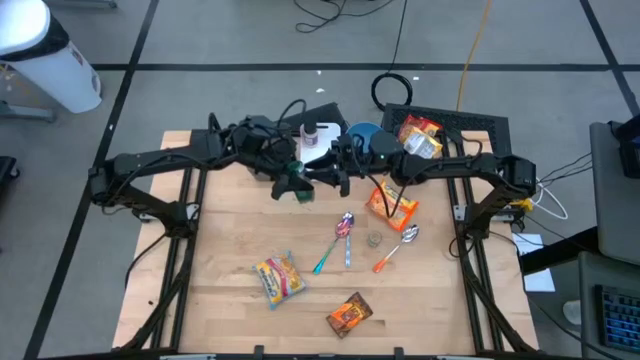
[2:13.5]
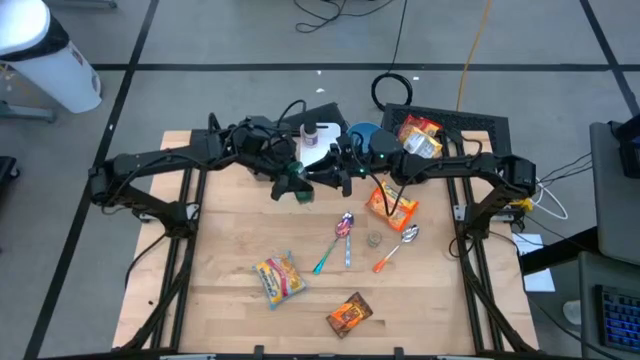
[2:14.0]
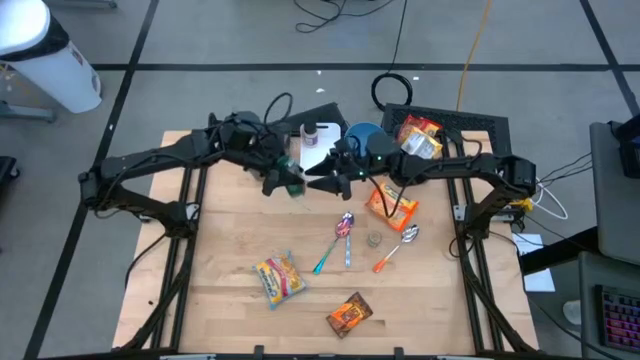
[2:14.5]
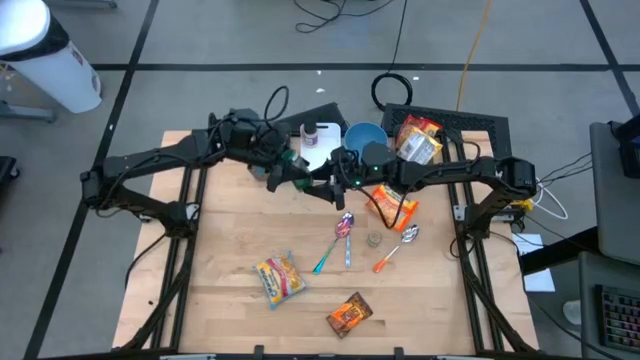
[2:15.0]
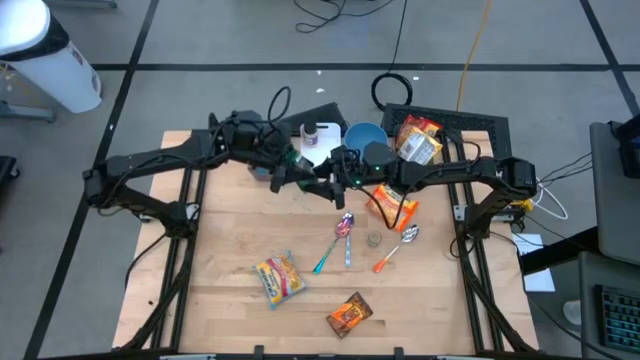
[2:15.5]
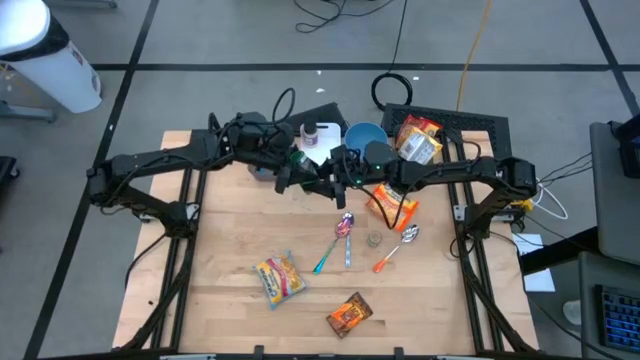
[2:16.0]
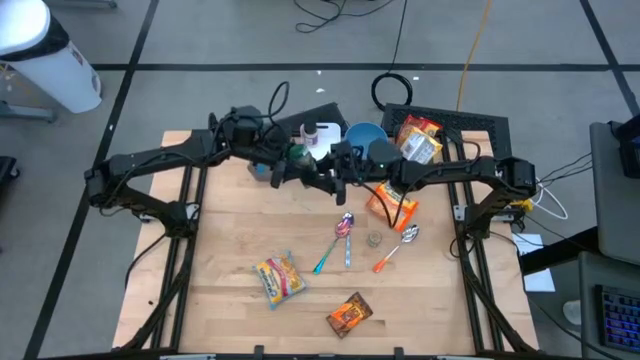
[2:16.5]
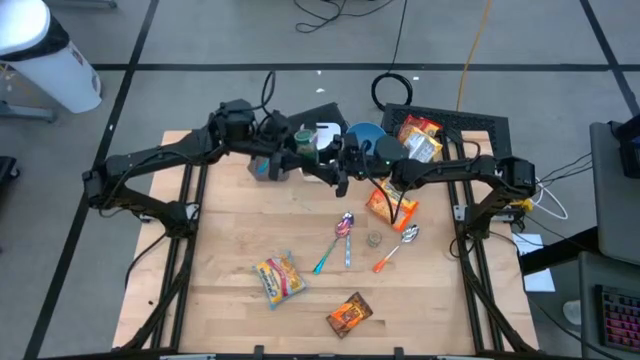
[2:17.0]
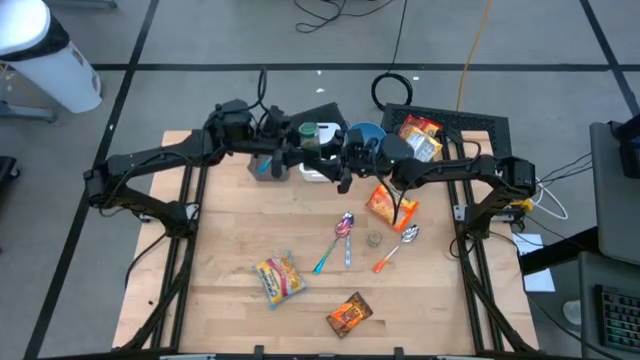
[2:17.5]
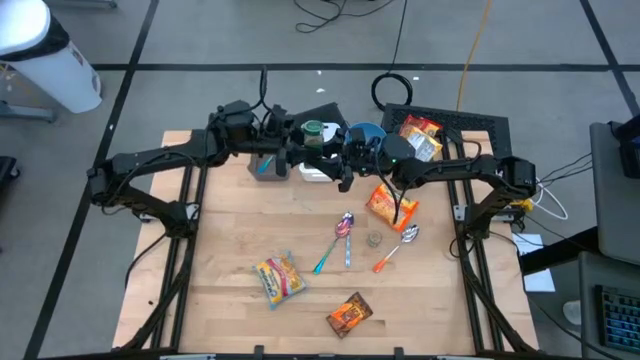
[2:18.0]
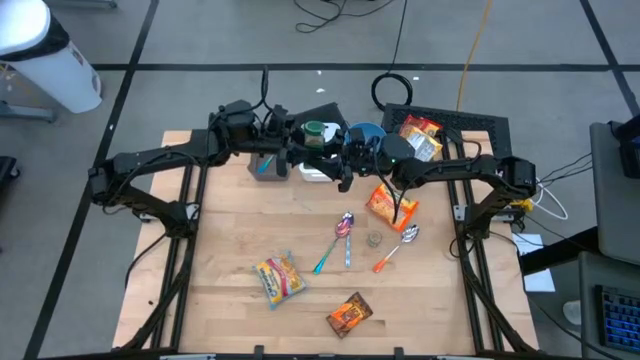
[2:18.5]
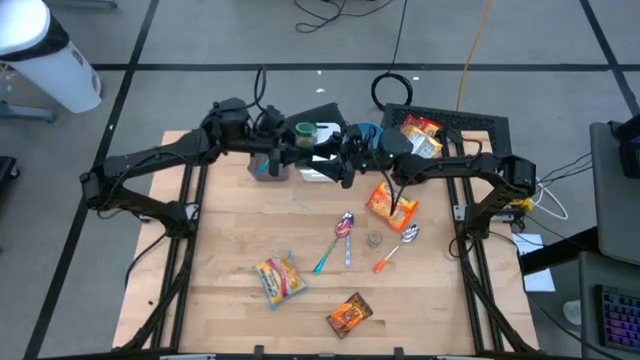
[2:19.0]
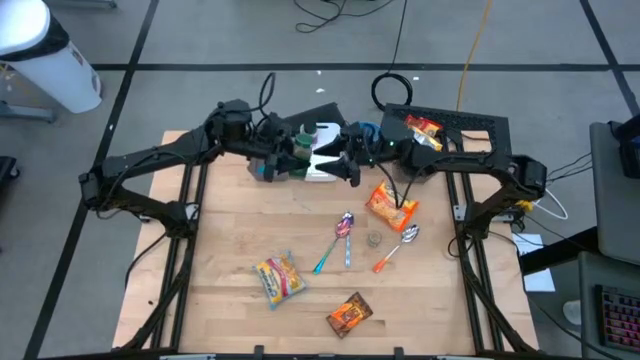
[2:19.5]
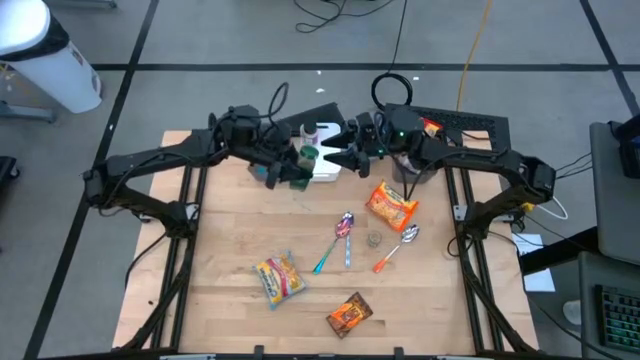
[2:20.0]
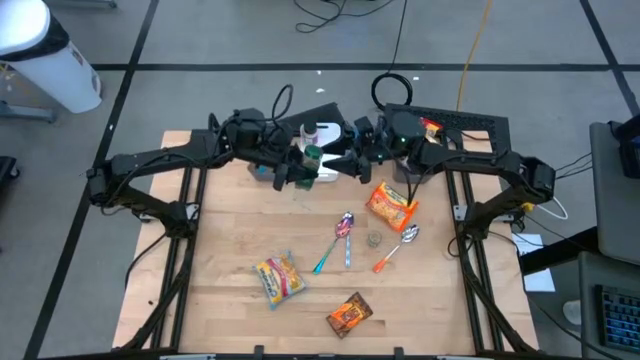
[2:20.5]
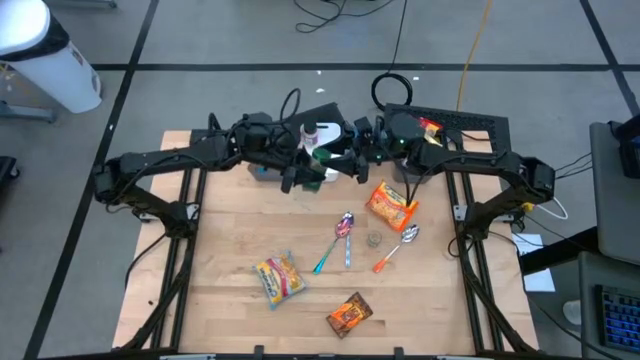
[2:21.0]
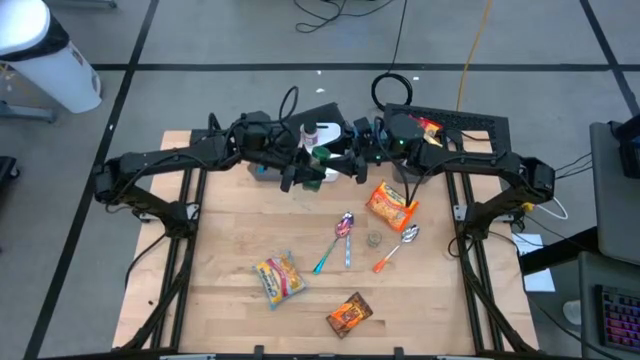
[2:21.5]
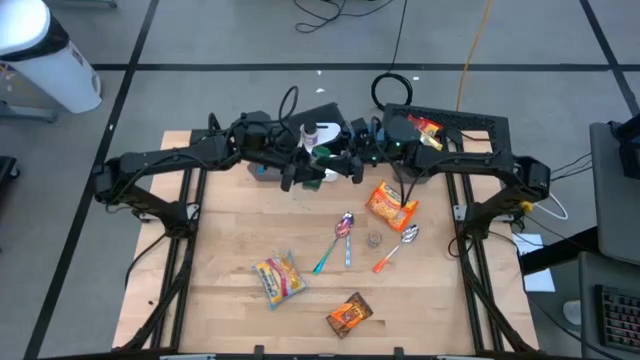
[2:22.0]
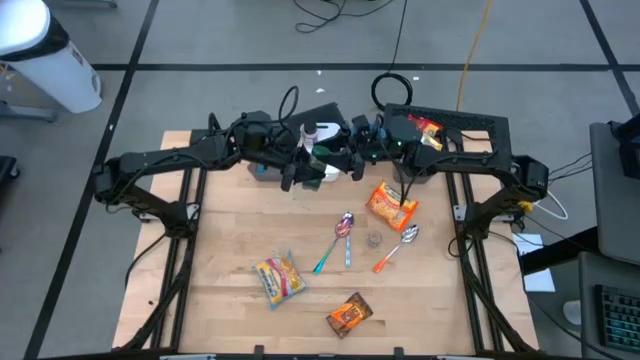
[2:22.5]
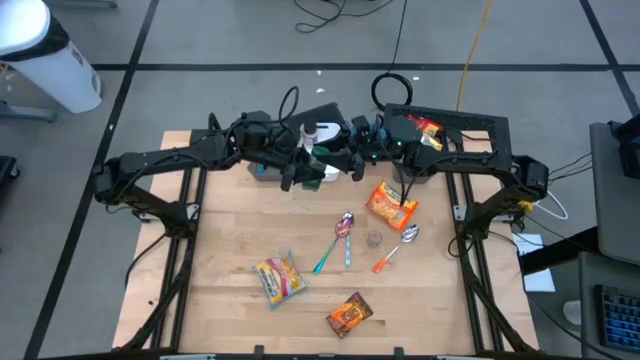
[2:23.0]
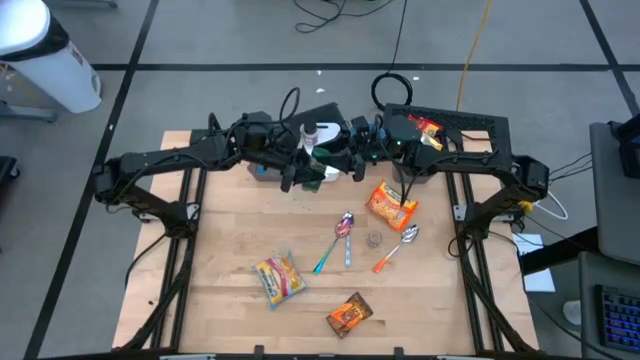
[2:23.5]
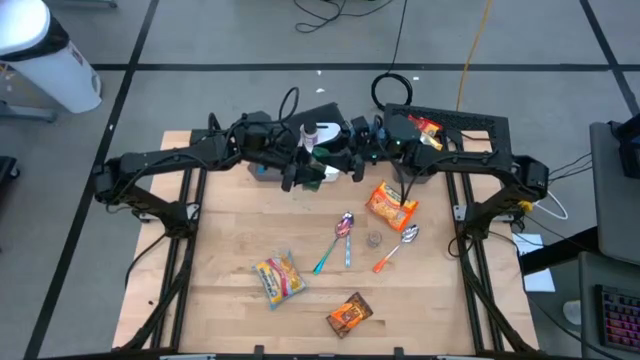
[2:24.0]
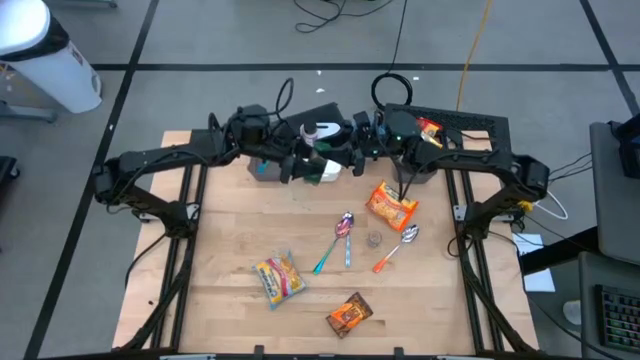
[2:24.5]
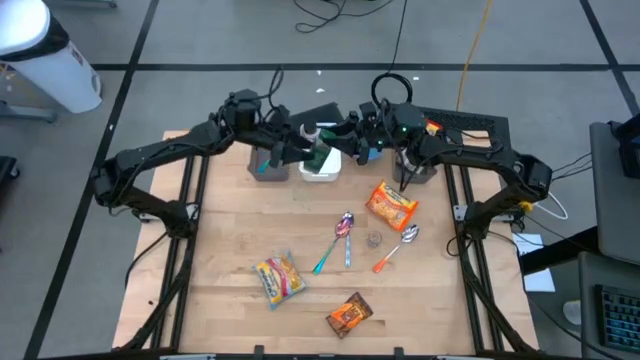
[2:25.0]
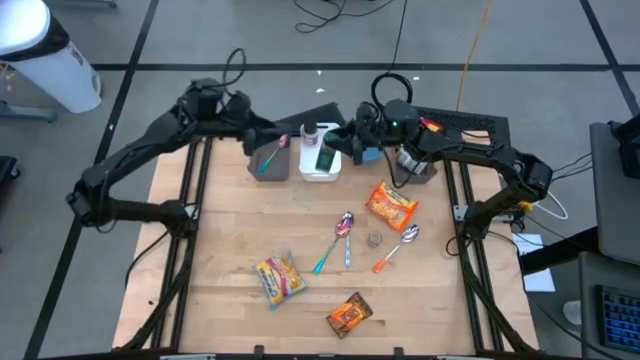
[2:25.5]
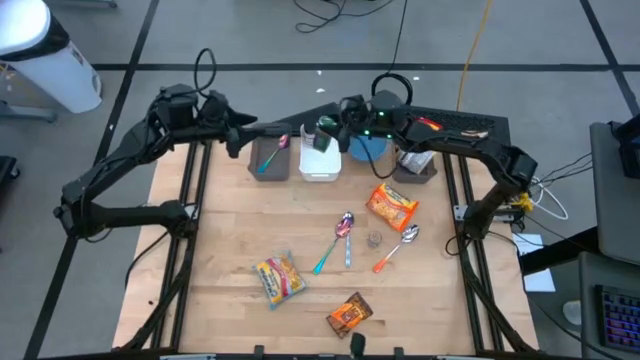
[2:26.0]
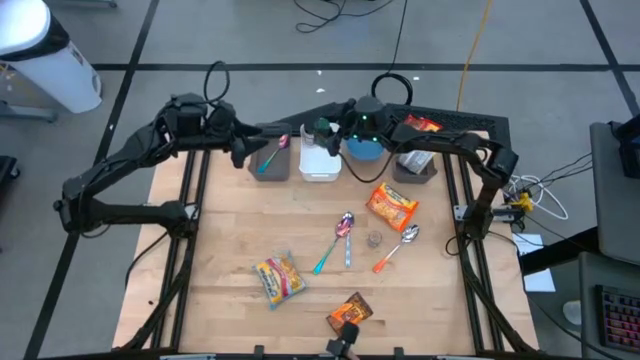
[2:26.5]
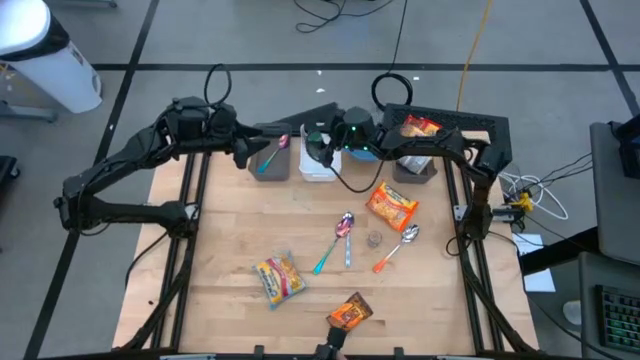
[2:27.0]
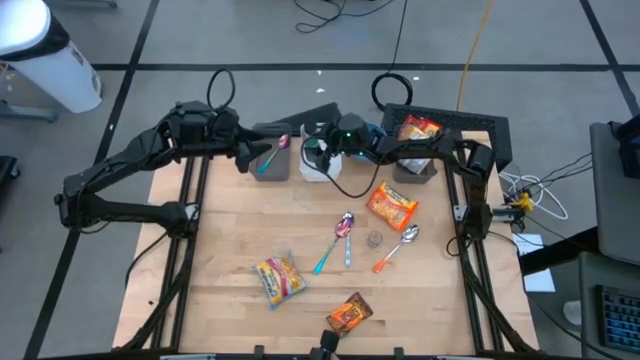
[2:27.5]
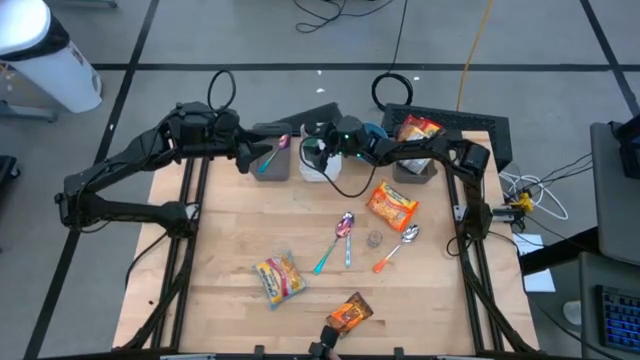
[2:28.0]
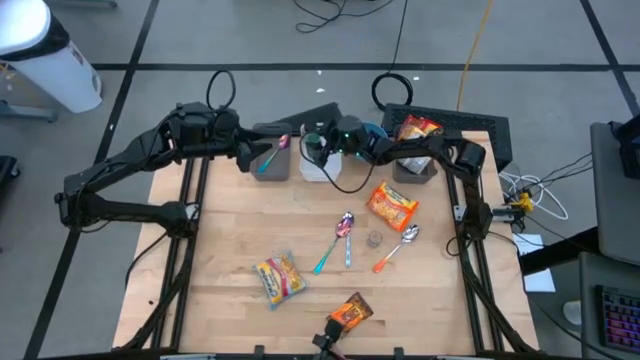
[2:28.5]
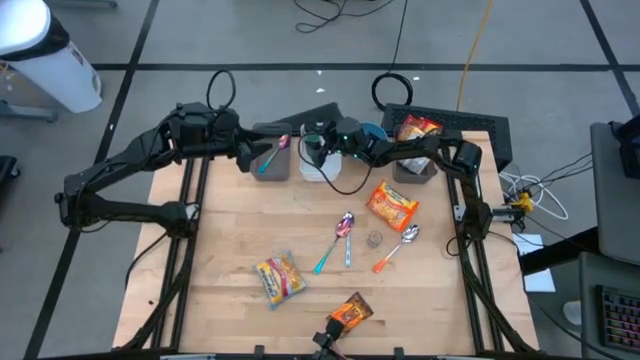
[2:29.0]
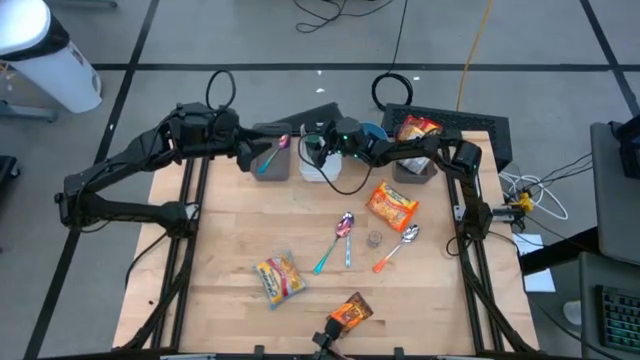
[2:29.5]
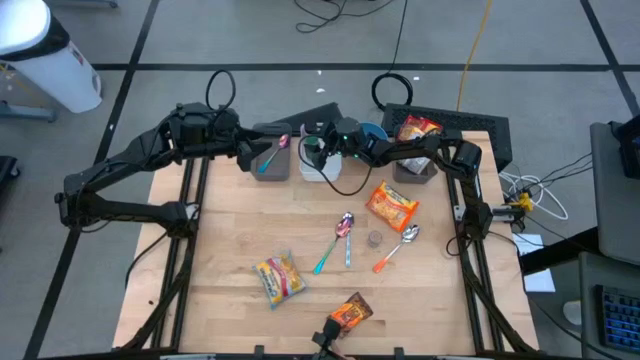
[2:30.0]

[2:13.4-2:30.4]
Task: Pick & Place Food Item
Put the green seasoning bottle into the white bin

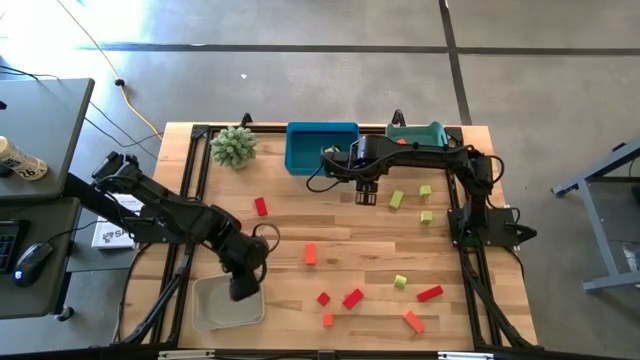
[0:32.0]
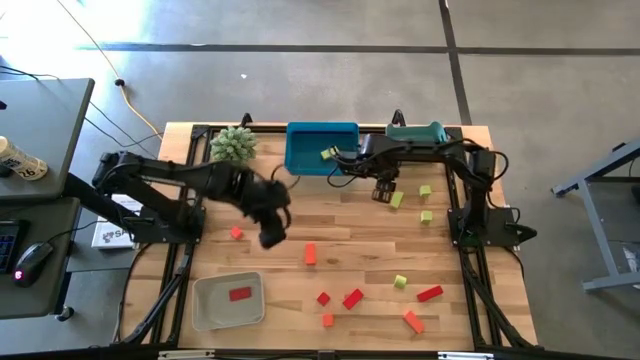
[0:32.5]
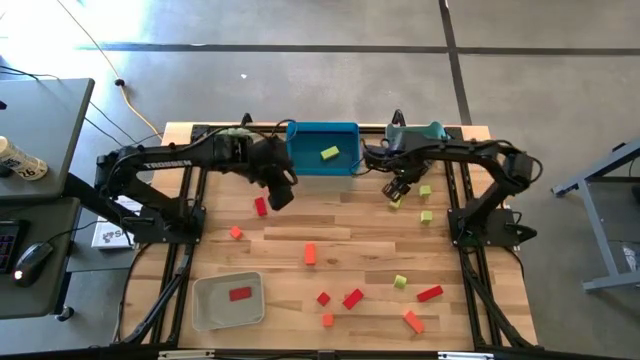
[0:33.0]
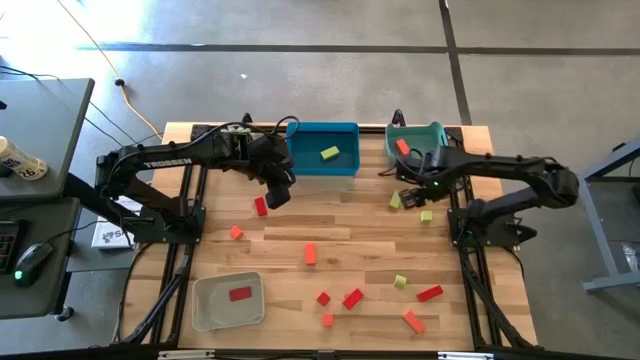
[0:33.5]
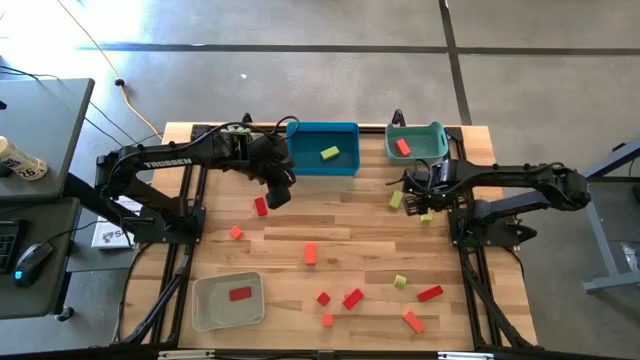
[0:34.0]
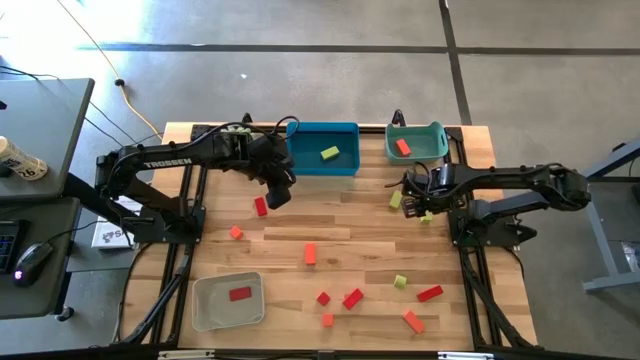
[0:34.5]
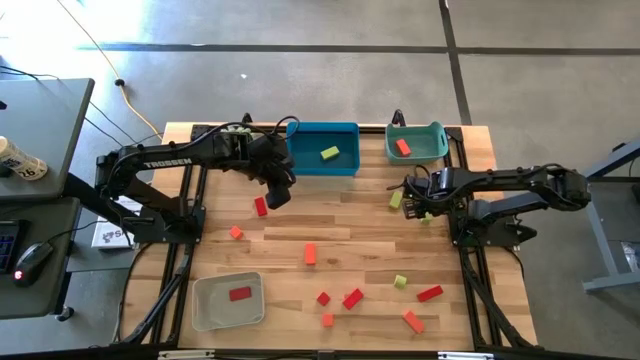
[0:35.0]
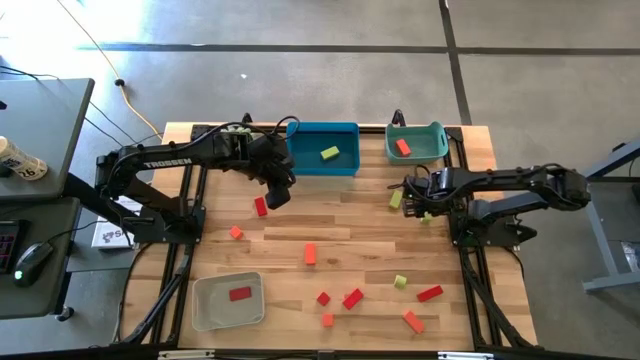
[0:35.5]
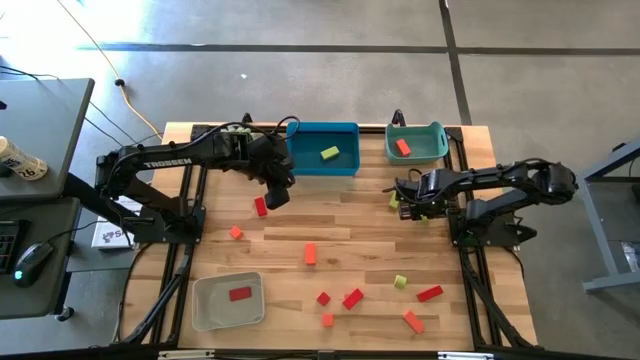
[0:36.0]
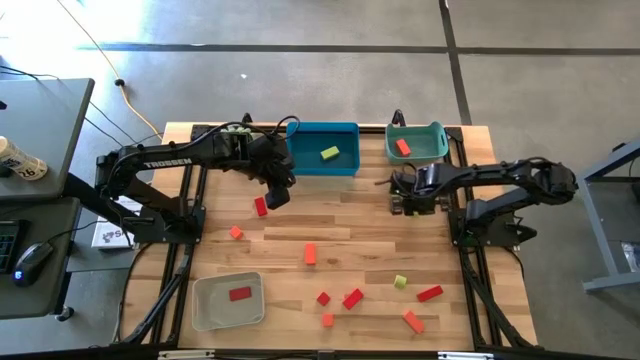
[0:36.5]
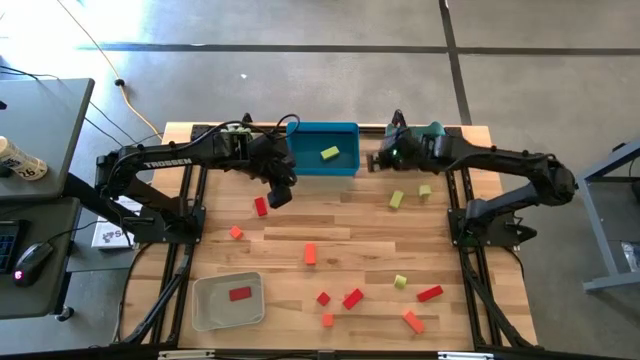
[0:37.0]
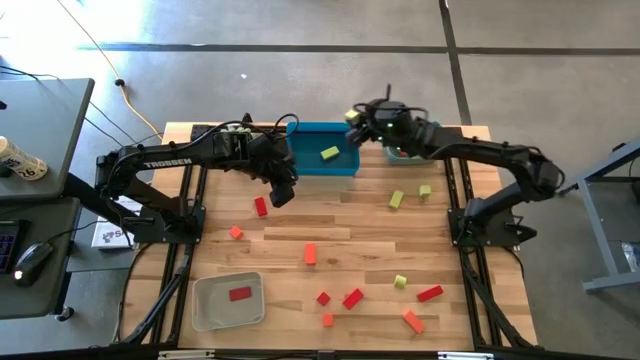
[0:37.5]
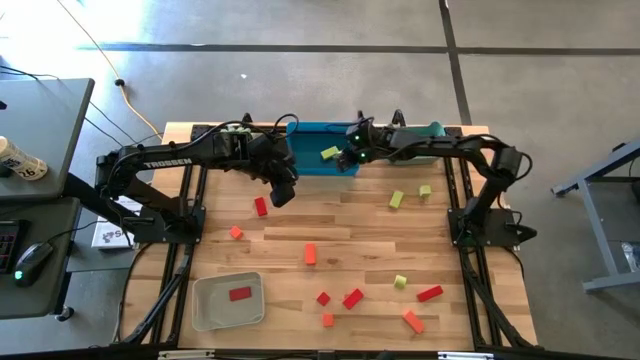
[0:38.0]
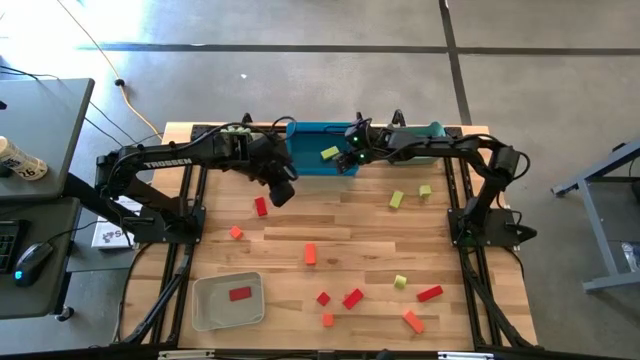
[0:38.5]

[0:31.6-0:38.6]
Task: Sort & place blocks by color
Put the green block into the blue bin
